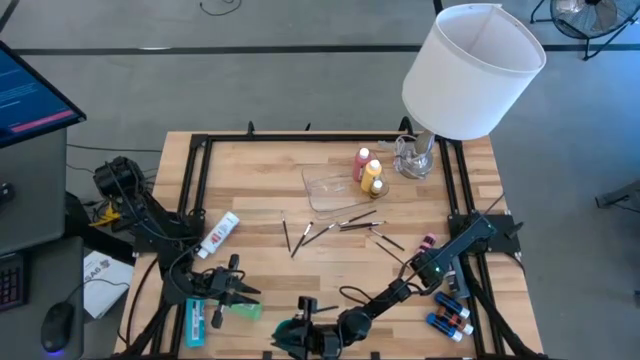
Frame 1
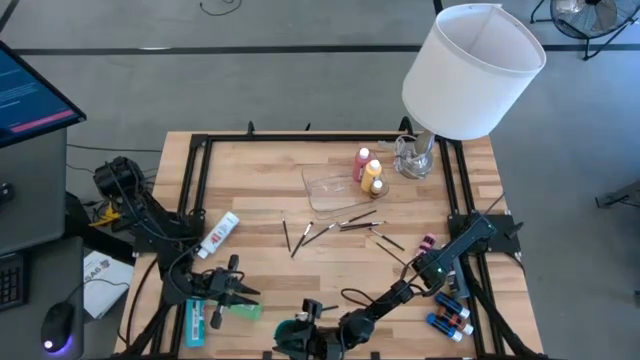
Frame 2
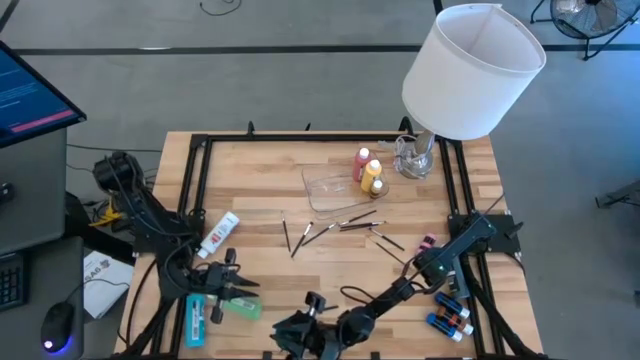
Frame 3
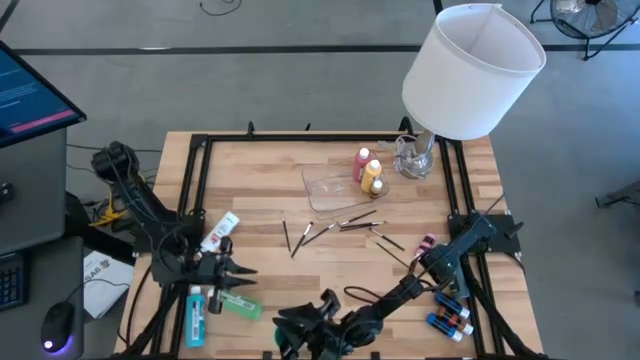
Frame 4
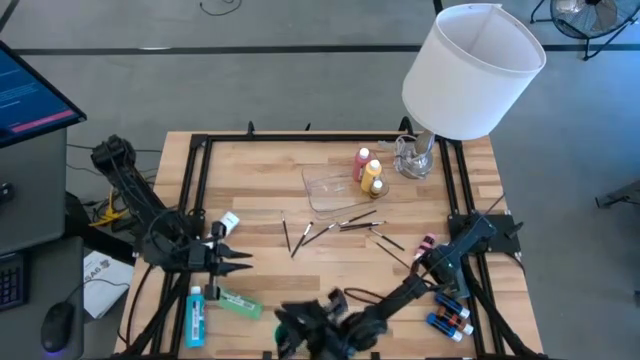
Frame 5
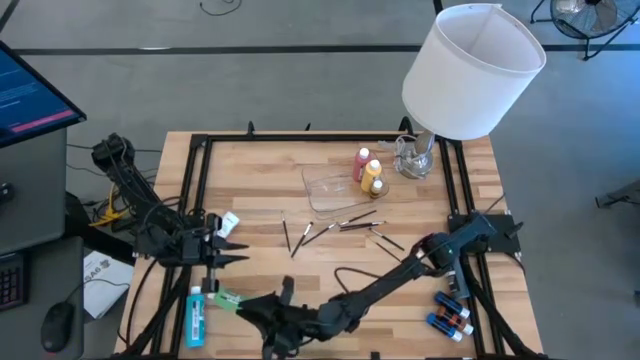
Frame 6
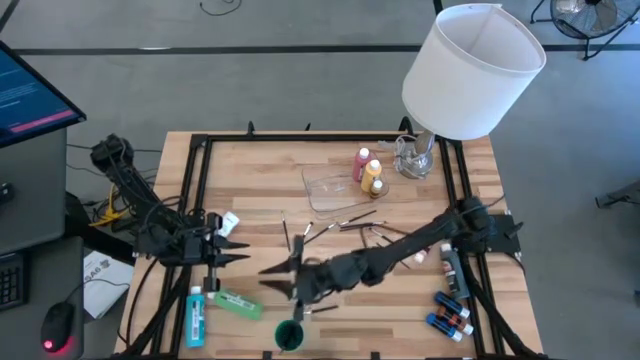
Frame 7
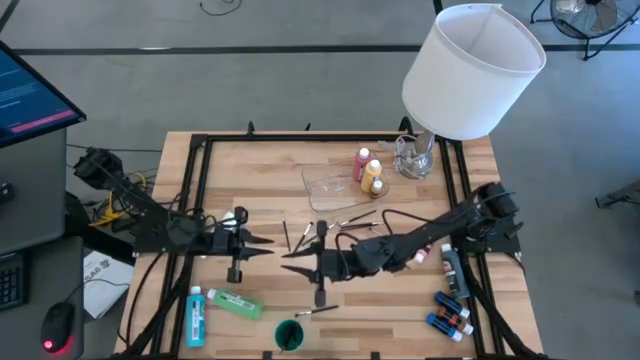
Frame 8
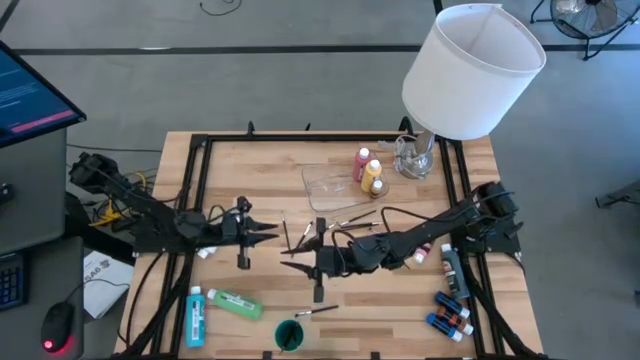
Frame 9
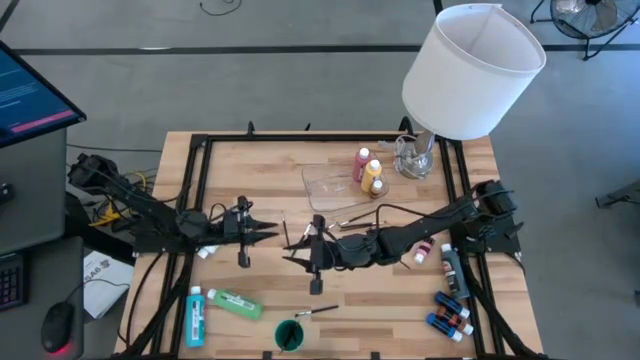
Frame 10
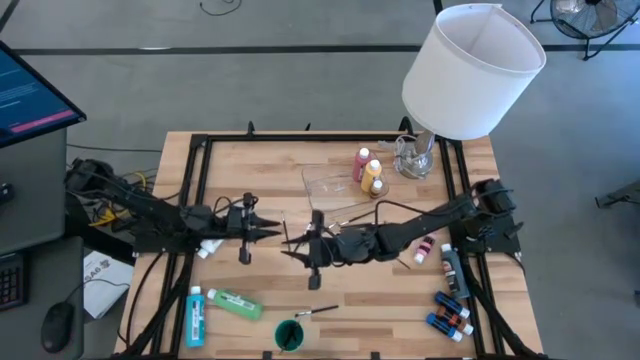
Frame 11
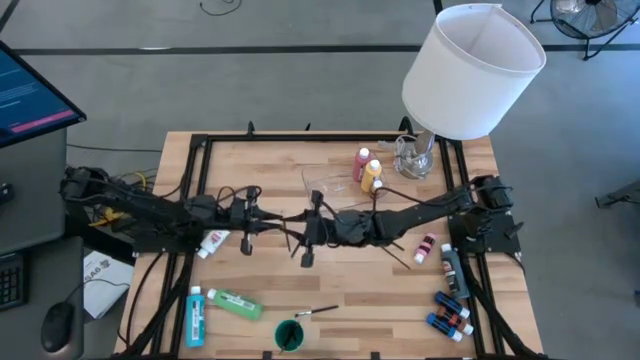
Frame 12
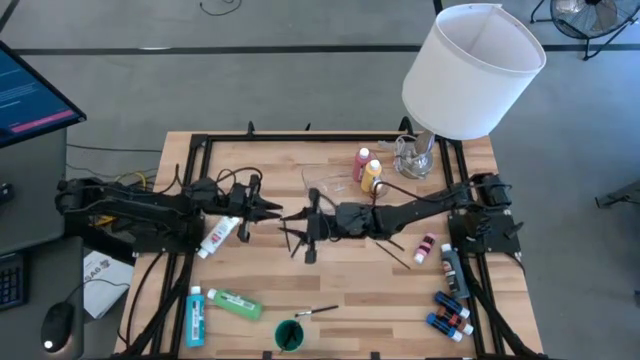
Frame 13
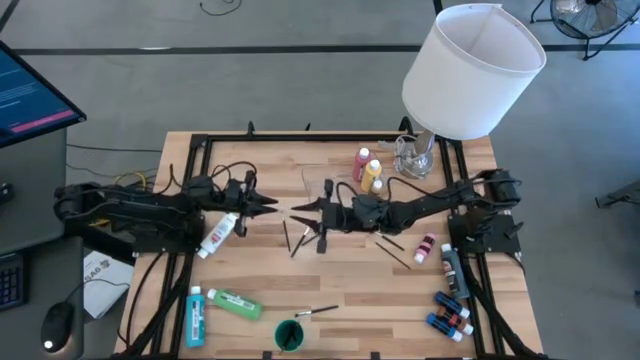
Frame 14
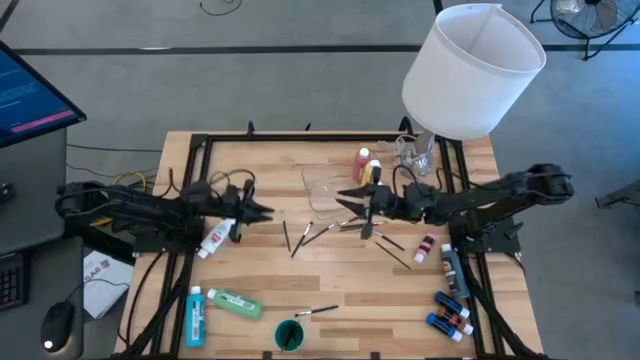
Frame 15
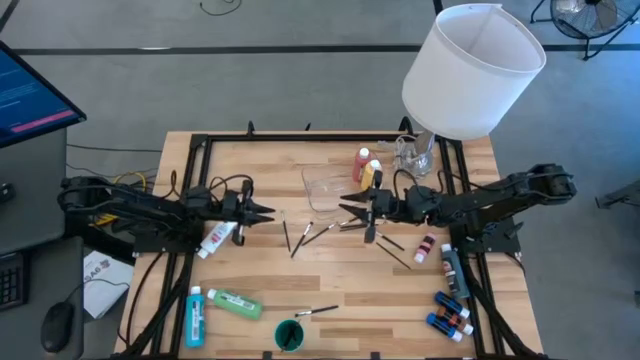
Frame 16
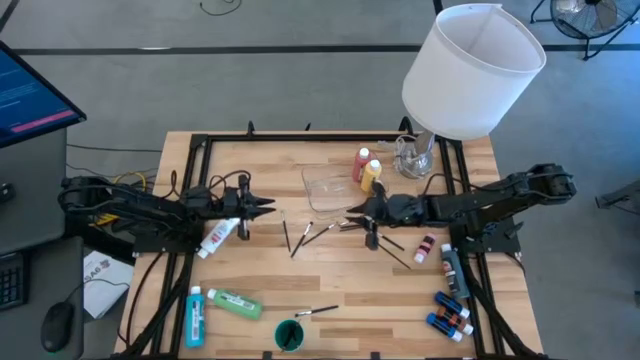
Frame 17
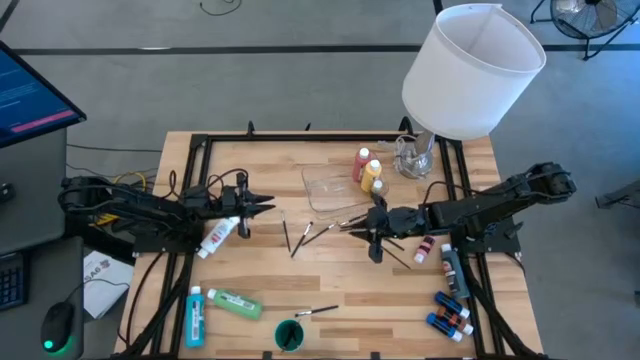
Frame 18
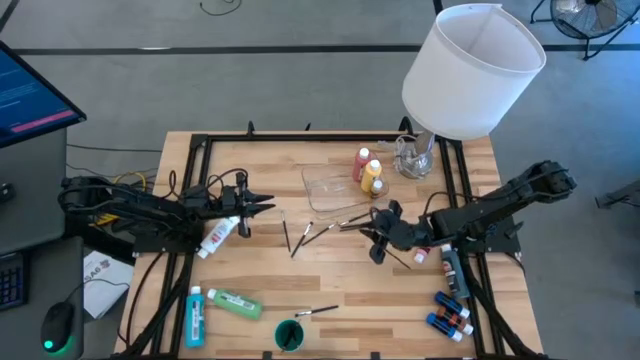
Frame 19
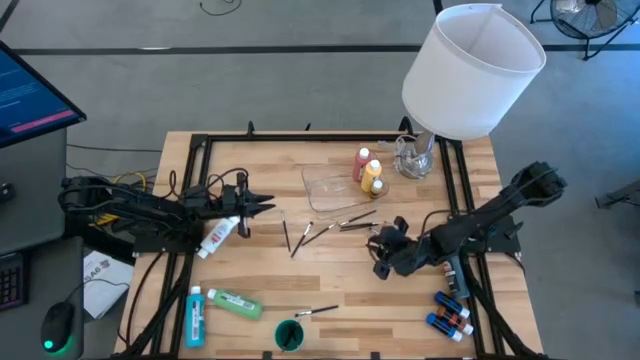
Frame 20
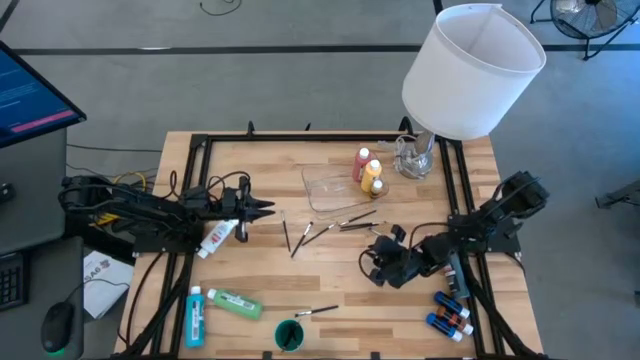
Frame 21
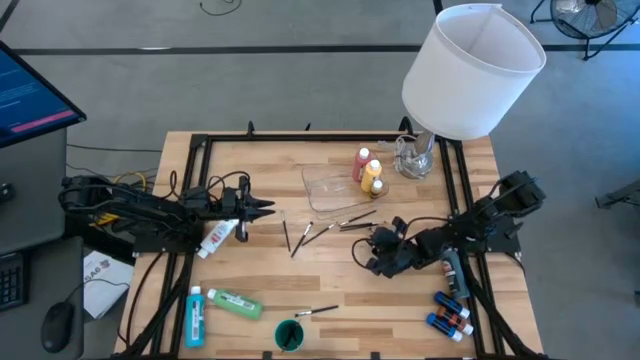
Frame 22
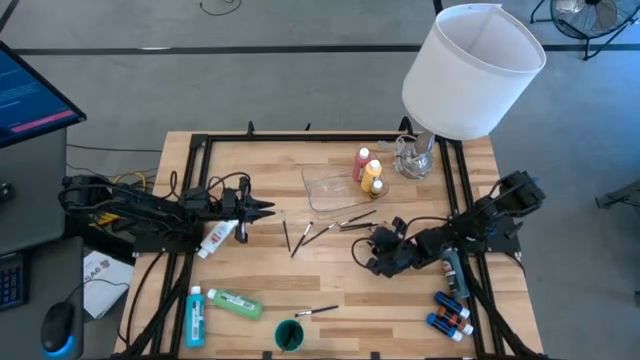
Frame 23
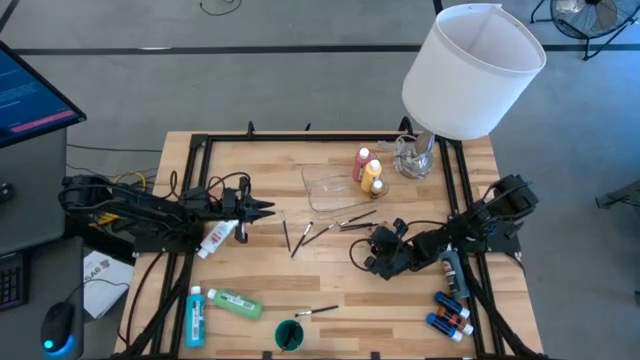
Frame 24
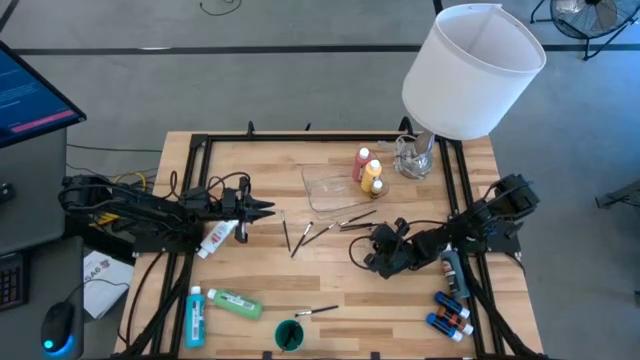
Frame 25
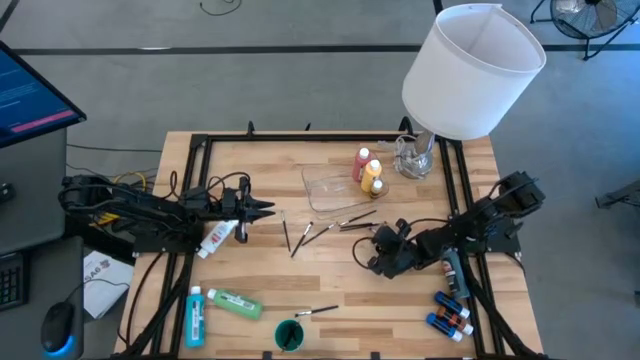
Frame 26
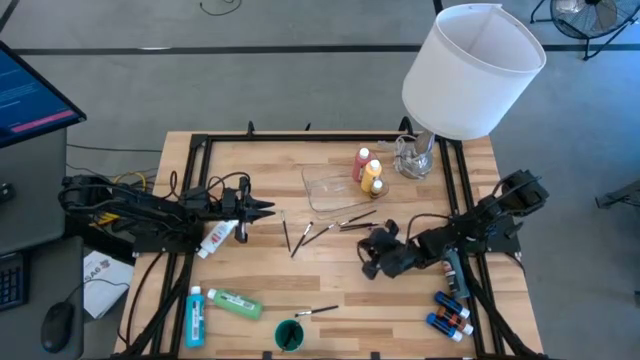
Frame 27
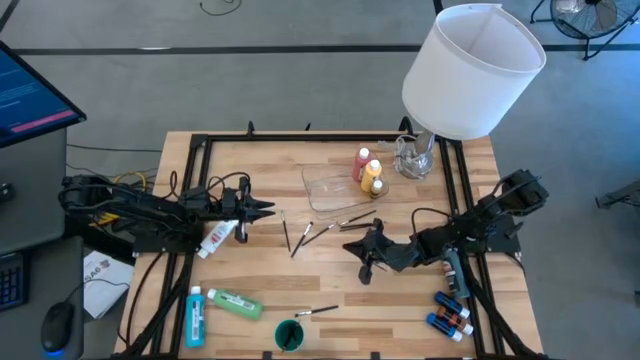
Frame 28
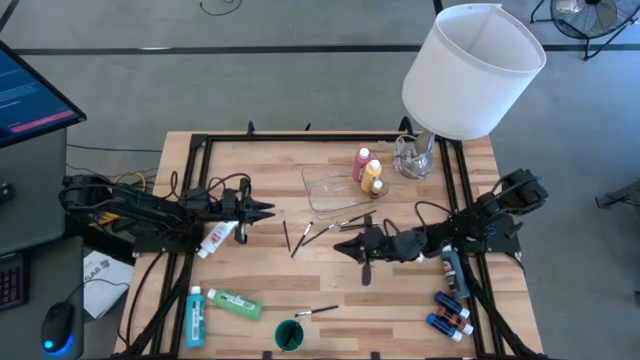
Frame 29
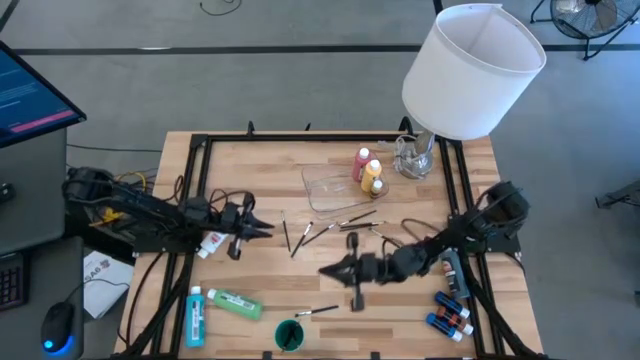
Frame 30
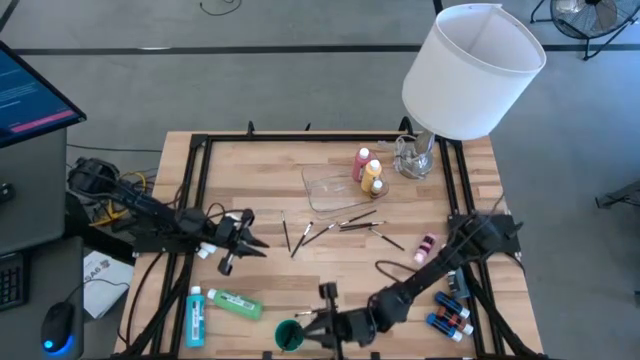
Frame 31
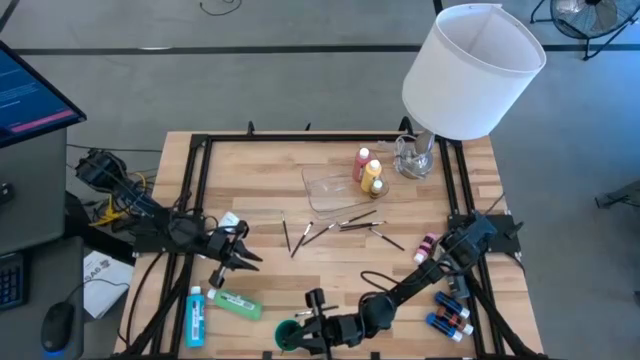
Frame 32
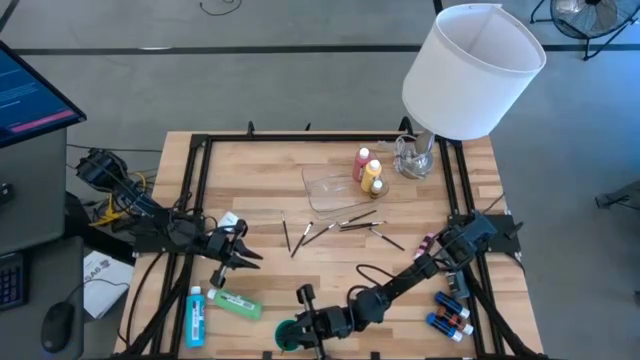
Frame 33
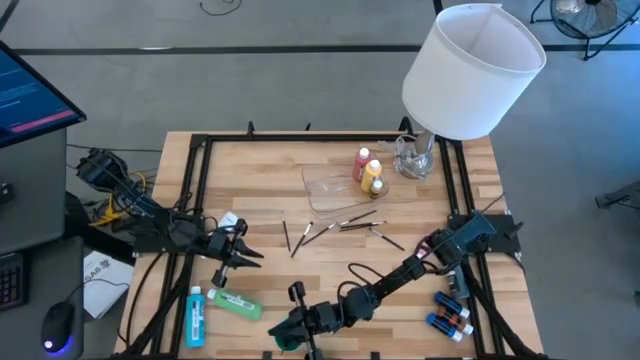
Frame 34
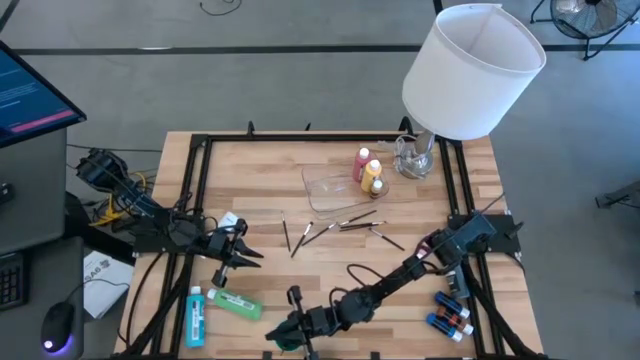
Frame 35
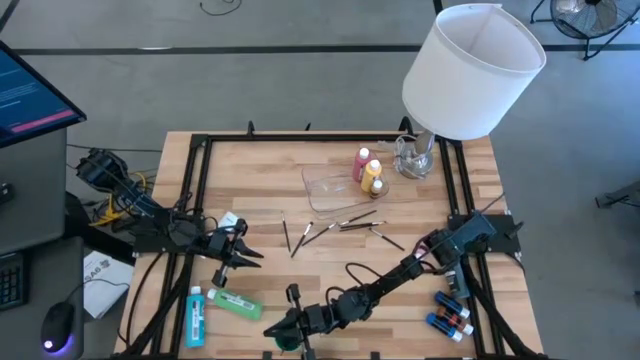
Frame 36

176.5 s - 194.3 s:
Task: Pick & Place Paint Supplies
Put the gold paintbrush into the green cup
